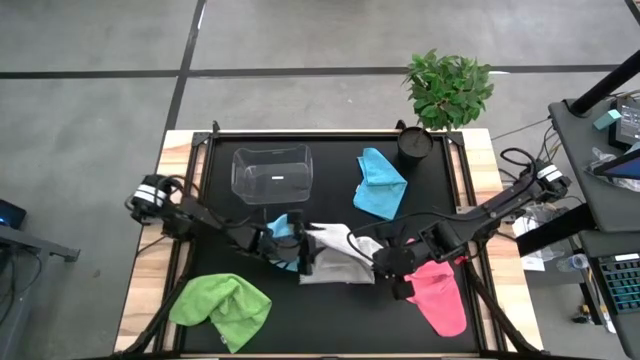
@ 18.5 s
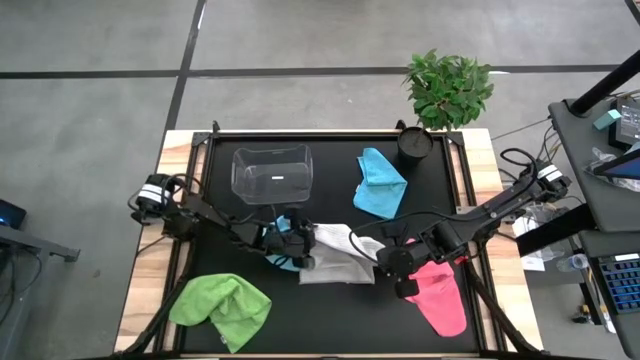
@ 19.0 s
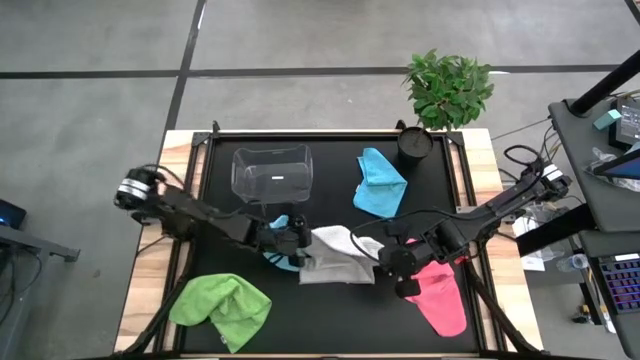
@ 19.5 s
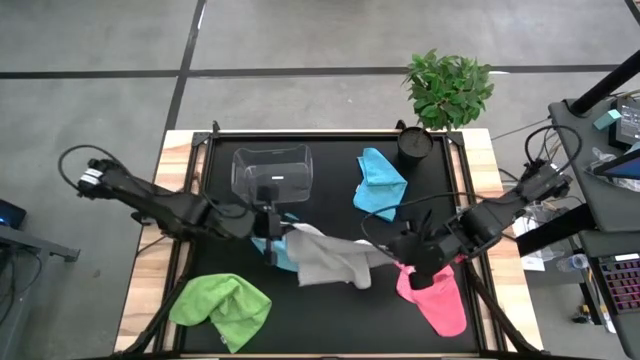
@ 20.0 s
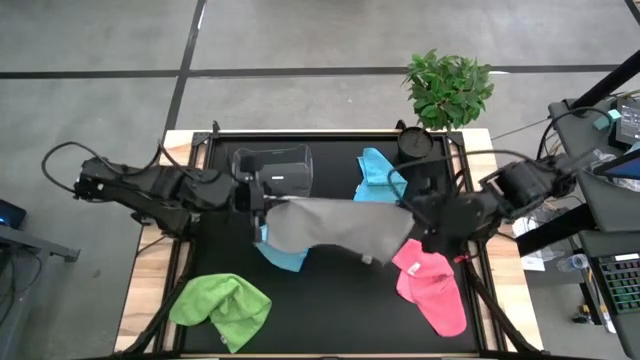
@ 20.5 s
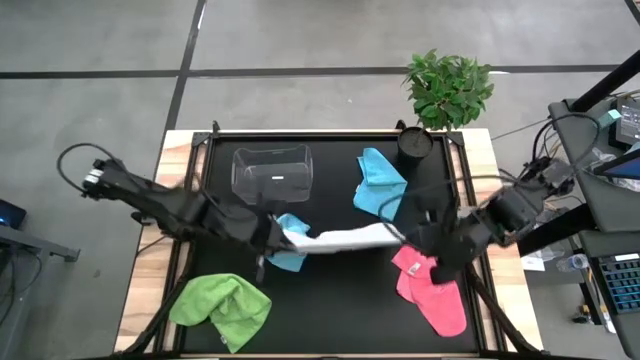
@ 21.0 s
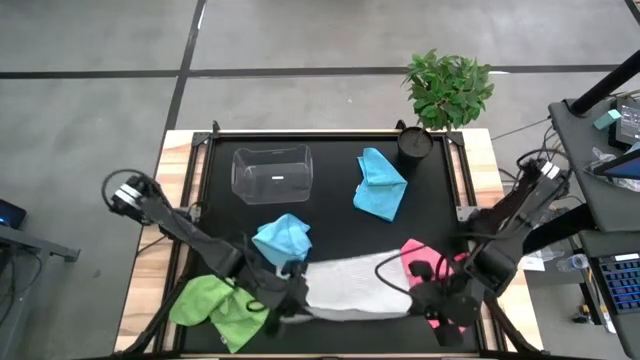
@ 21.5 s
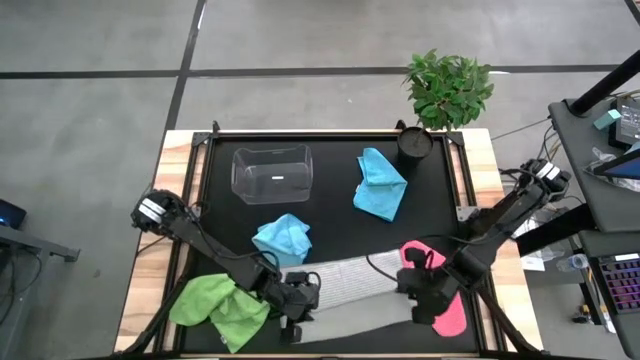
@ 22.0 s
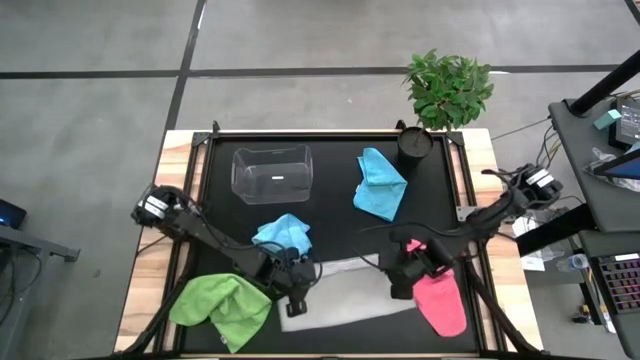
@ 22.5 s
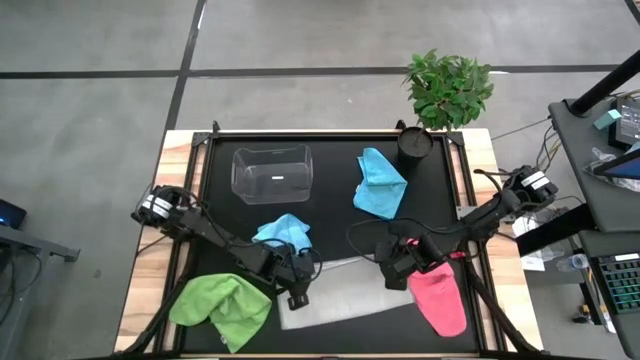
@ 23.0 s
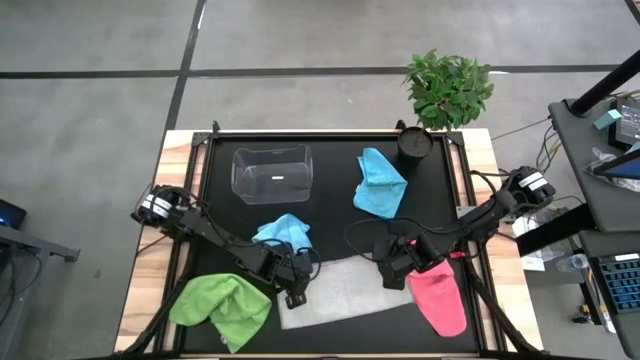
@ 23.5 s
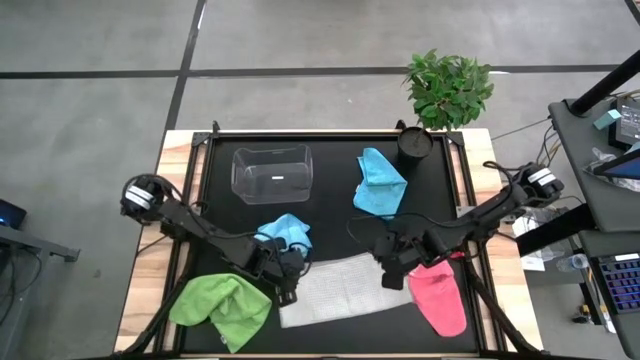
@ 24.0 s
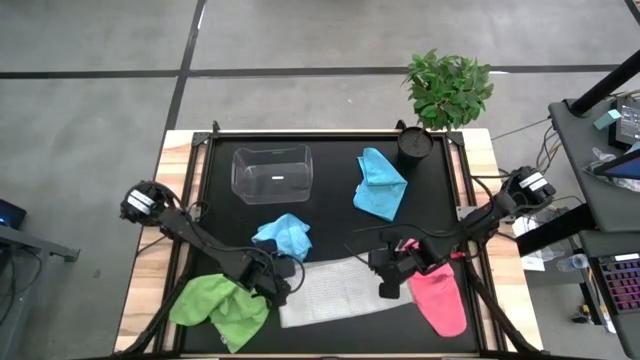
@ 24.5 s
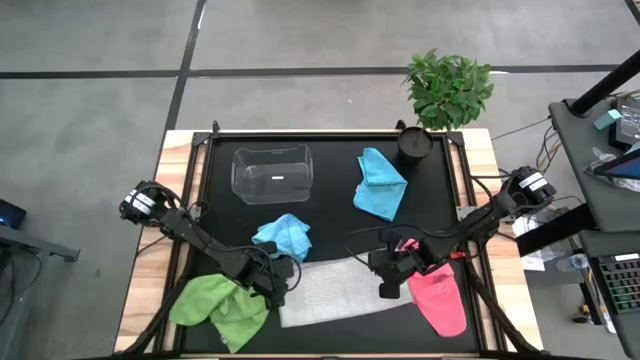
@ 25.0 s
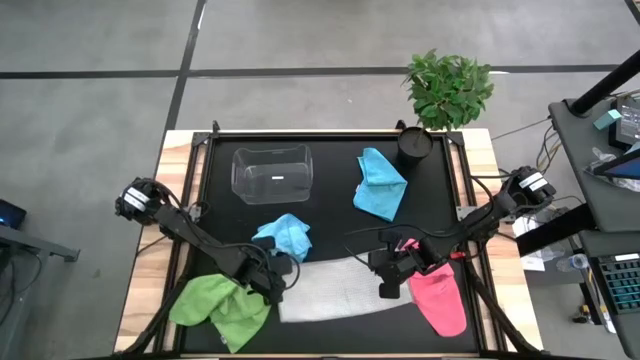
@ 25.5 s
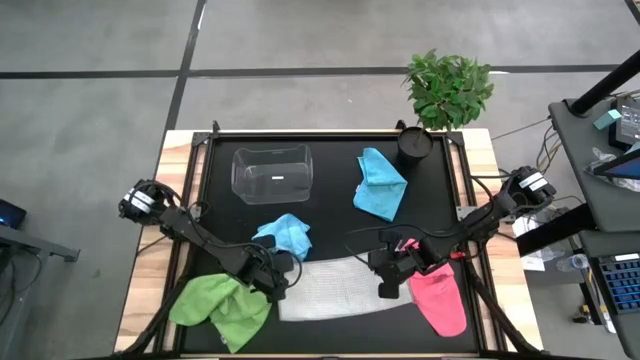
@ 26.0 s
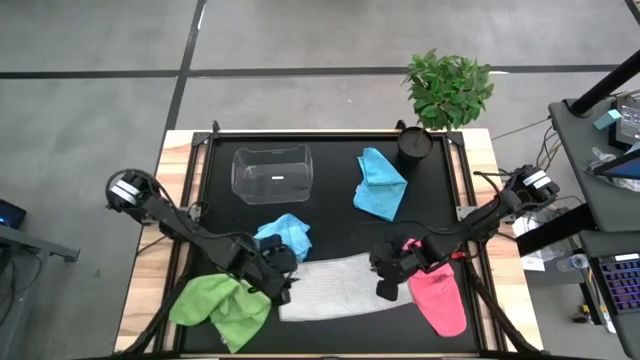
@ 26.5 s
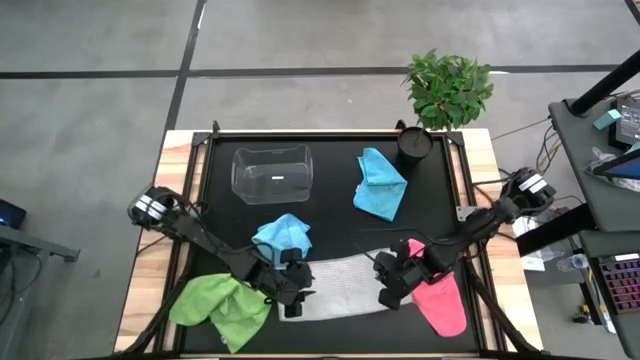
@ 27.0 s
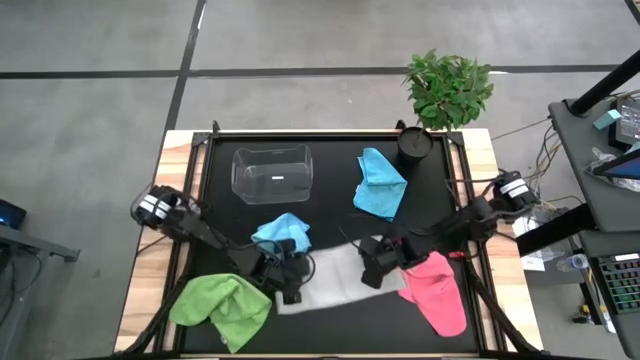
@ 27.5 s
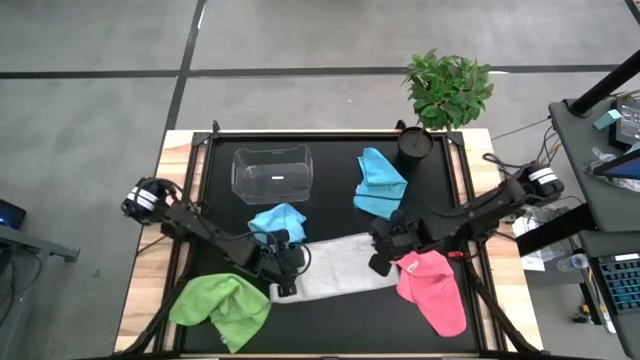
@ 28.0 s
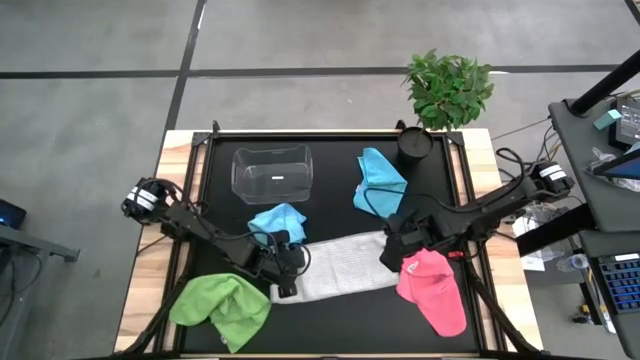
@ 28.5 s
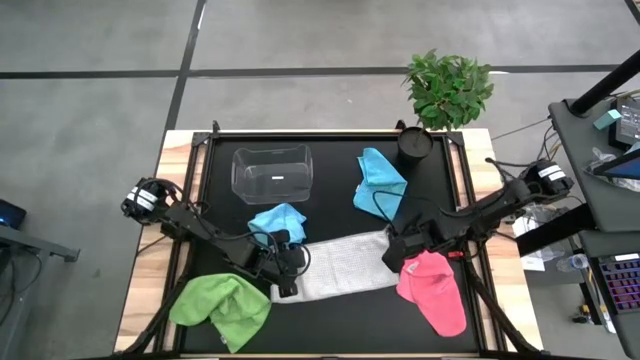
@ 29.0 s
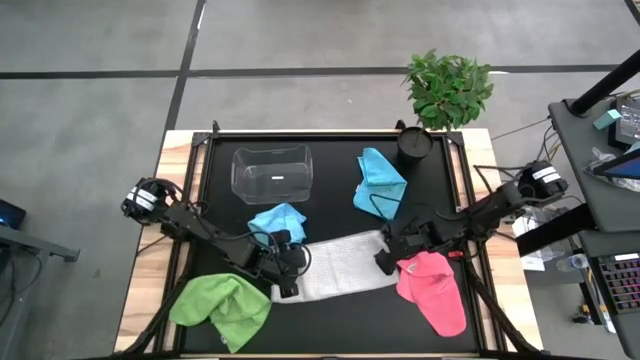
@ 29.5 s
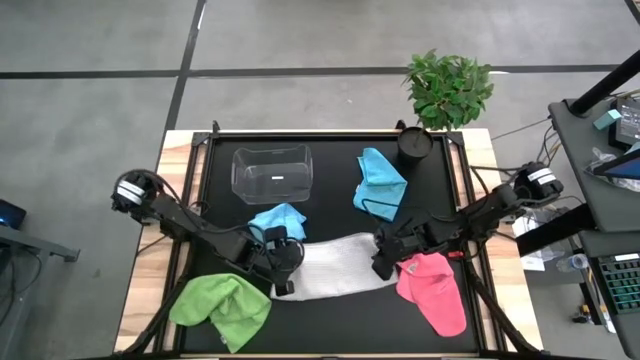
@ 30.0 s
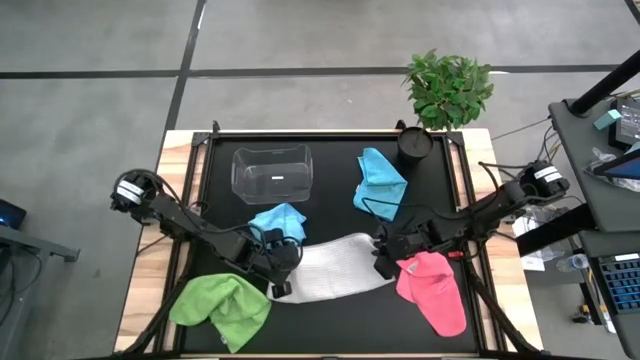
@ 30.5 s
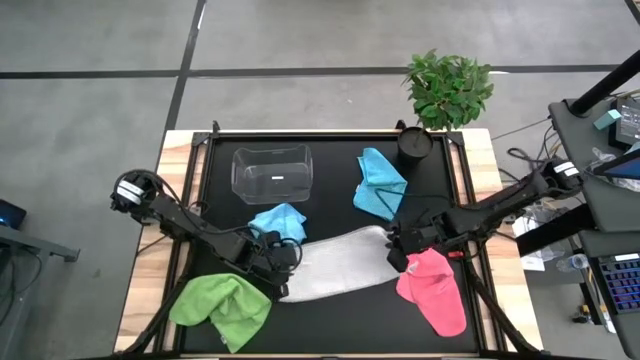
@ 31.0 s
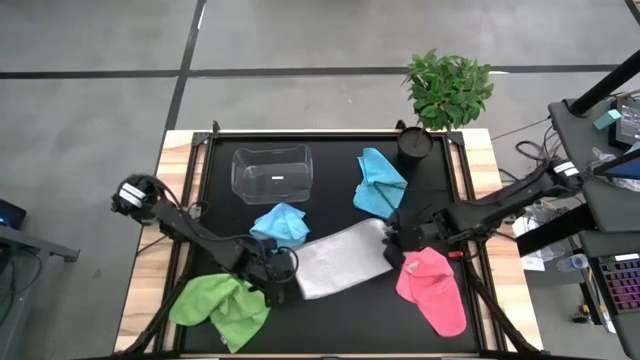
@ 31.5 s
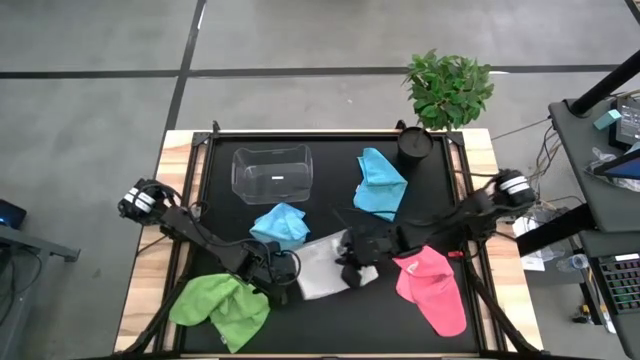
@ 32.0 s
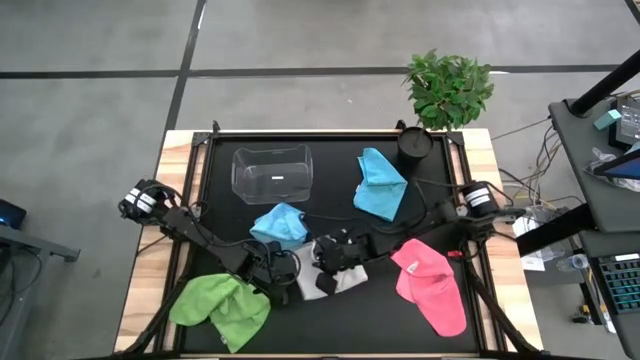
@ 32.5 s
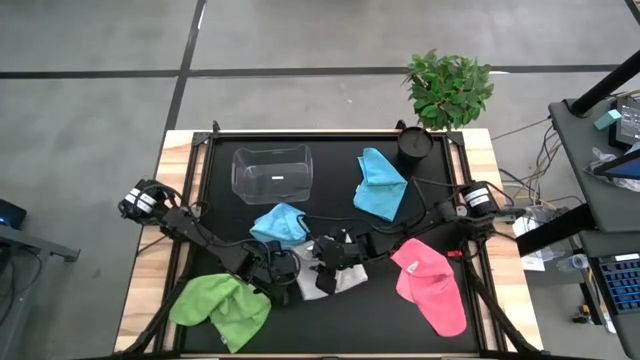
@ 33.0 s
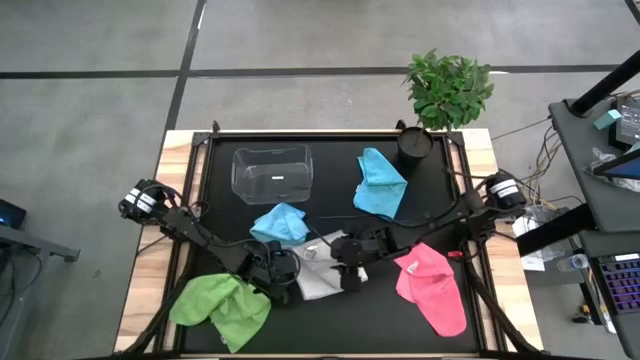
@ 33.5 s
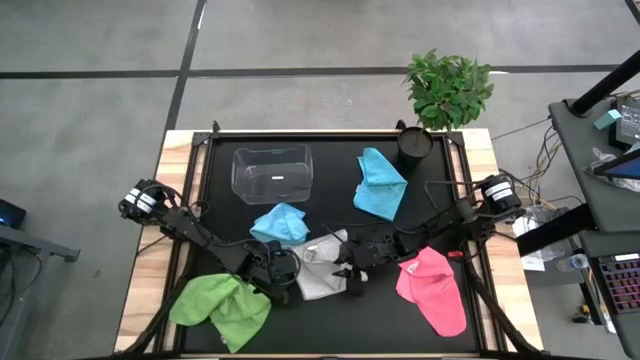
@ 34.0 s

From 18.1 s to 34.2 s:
Task: Fold microfiber towels
Fold the gray microfiber cloth

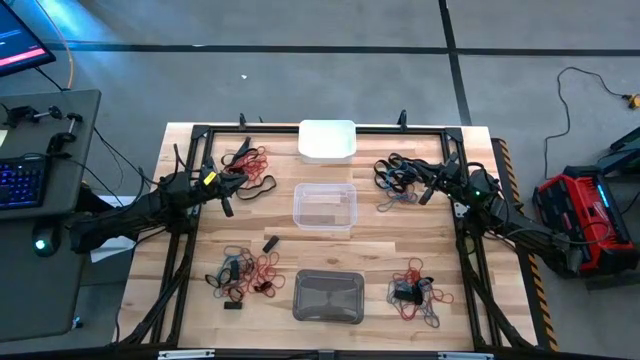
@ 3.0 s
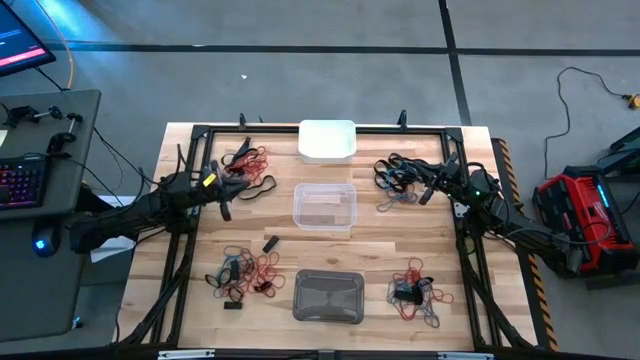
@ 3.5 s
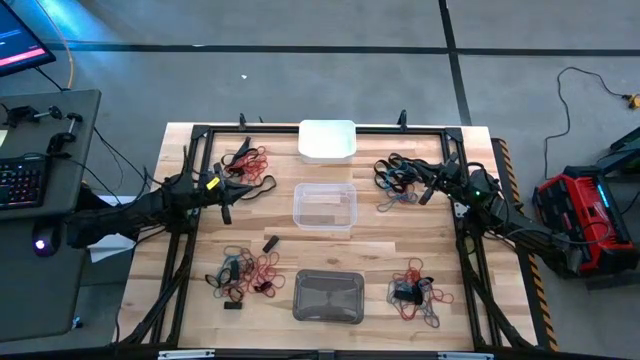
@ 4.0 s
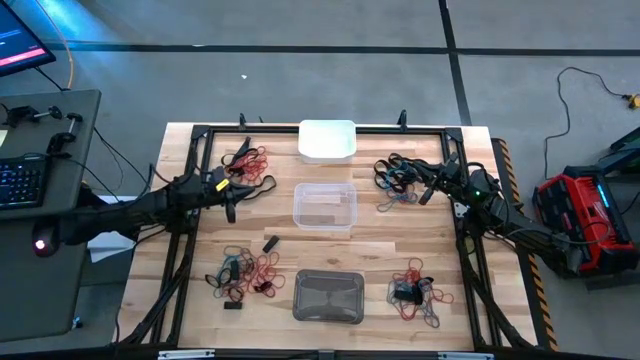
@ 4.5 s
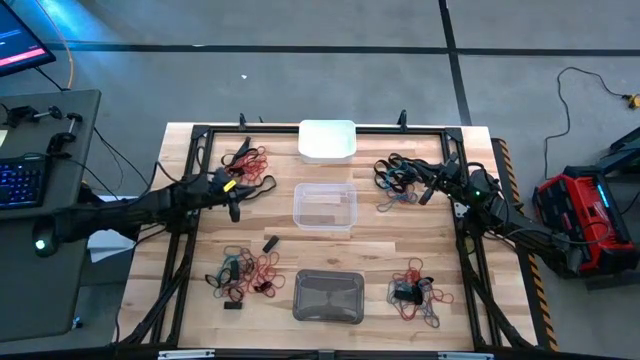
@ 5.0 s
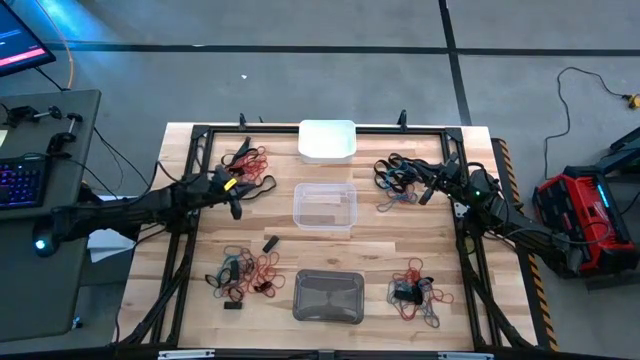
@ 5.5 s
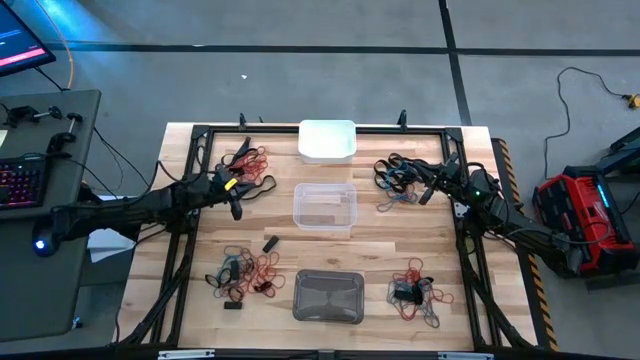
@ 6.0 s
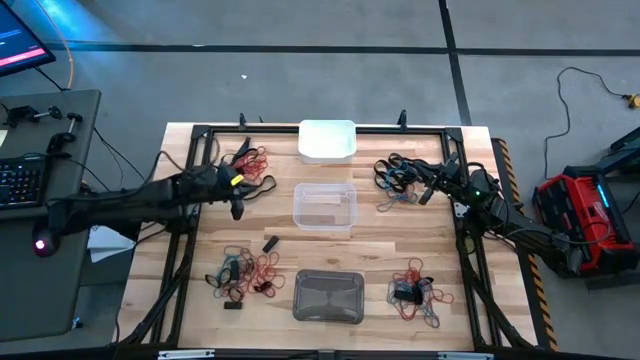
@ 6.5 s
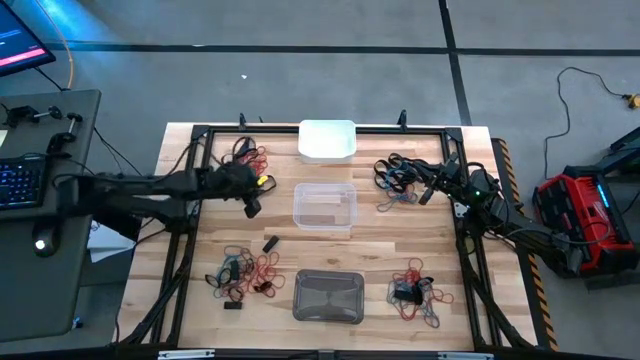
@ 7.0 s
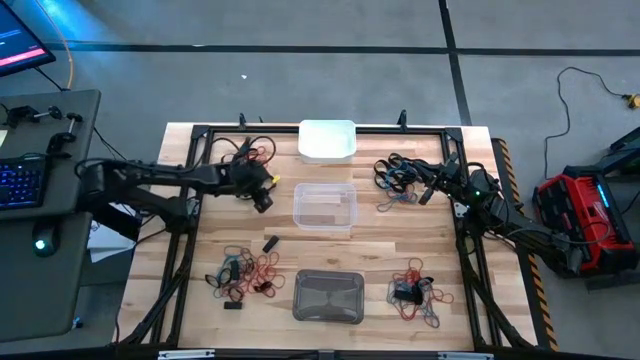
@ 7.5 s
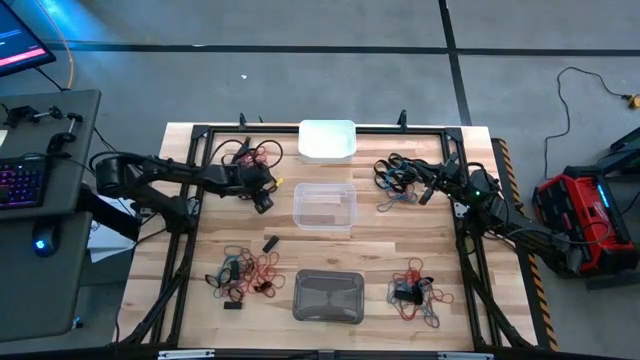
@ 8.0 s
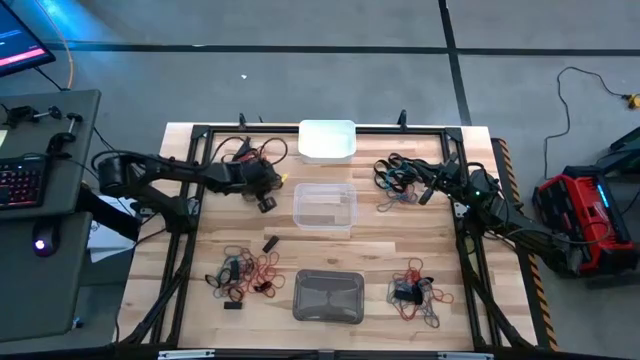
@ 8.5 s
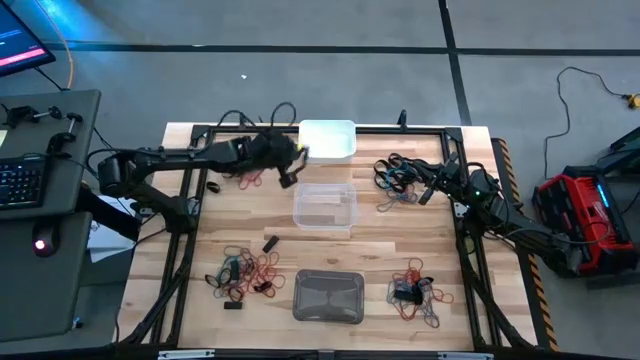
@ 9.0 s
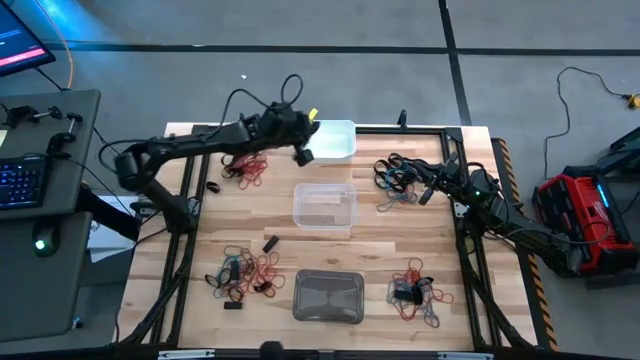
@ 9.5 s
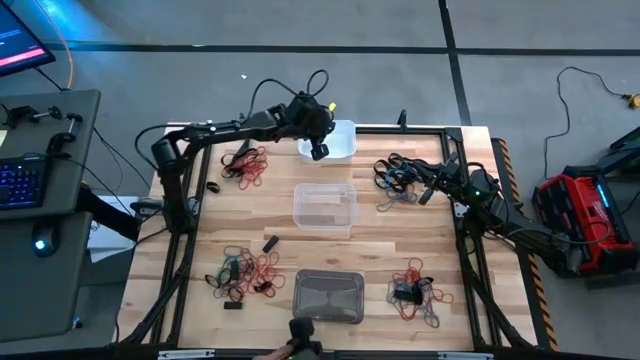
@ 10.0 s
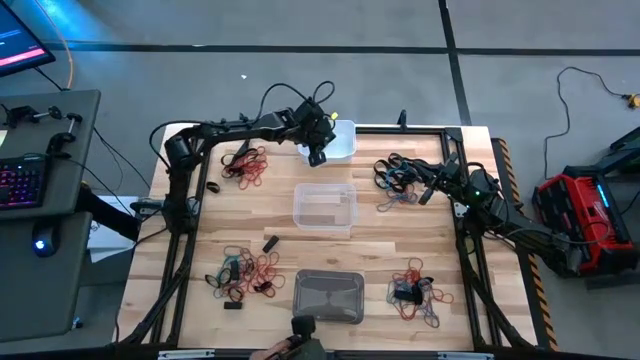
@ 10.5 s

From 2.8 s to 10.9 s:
Task: Sort rubber bands into baskets
Put the black rubber band into the white bin
